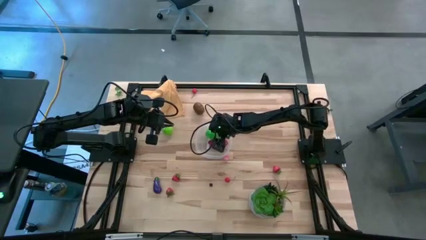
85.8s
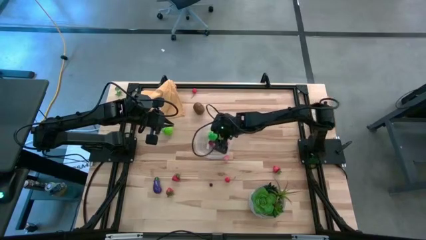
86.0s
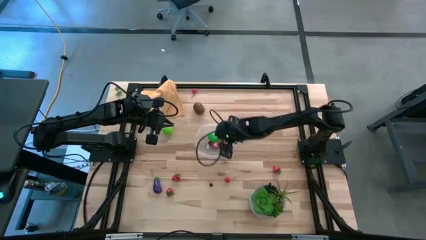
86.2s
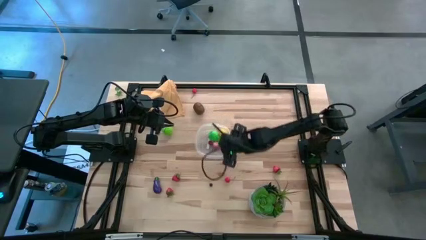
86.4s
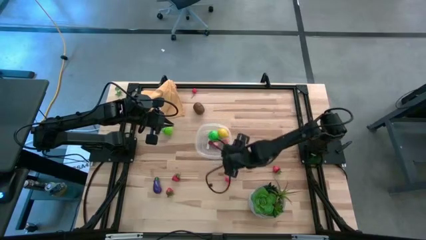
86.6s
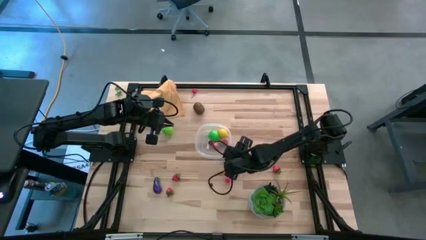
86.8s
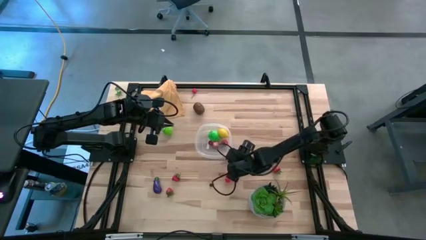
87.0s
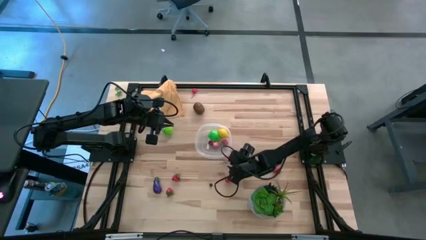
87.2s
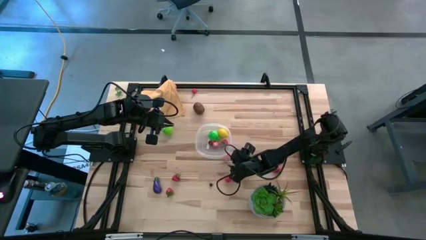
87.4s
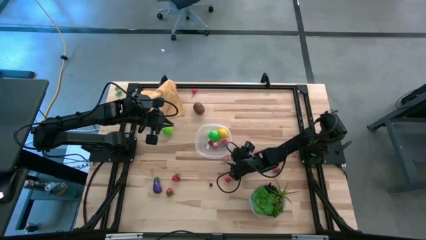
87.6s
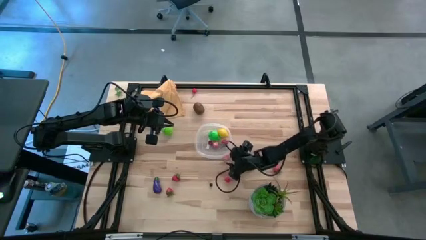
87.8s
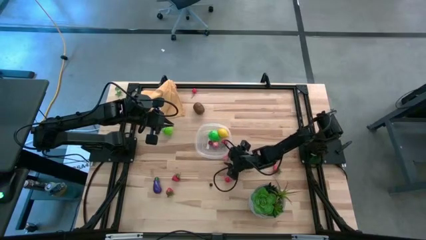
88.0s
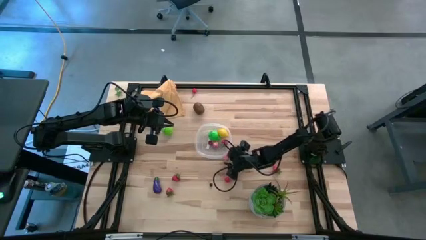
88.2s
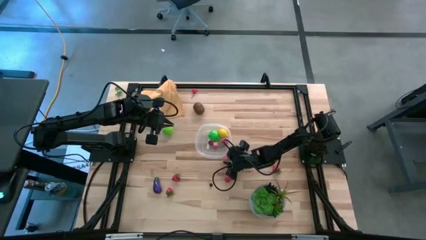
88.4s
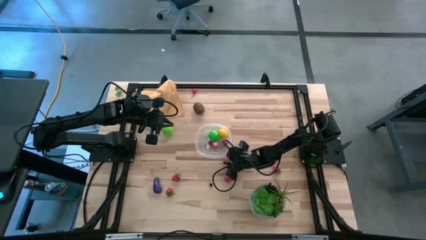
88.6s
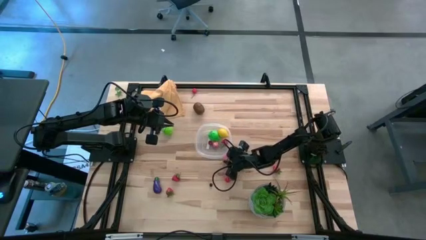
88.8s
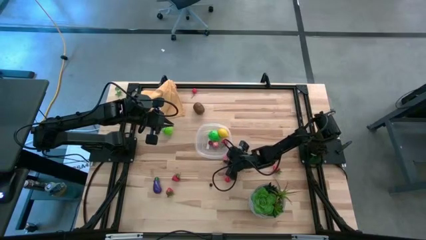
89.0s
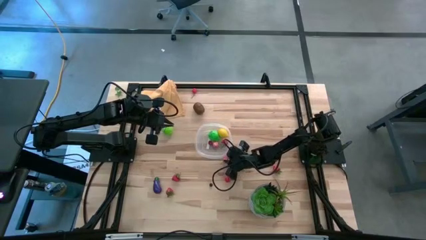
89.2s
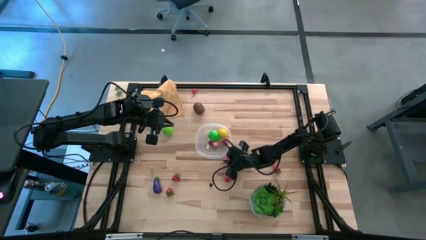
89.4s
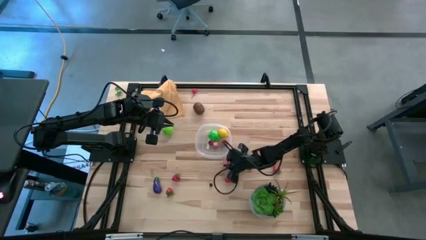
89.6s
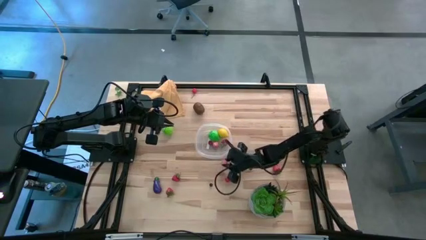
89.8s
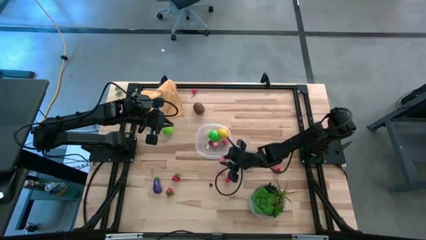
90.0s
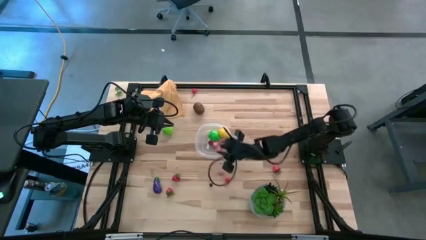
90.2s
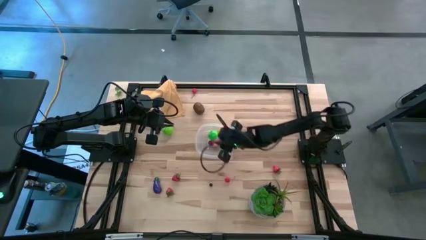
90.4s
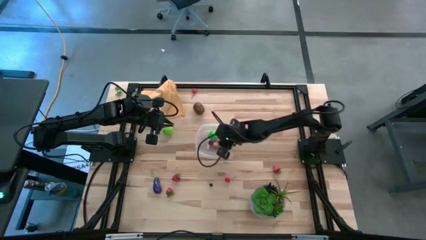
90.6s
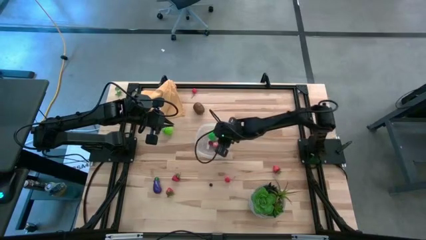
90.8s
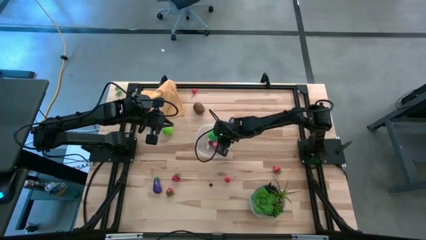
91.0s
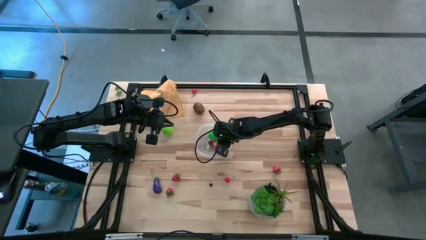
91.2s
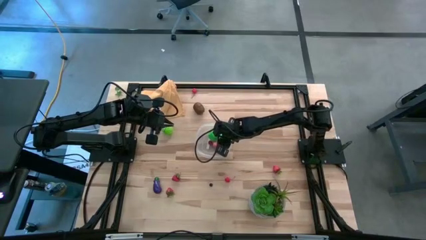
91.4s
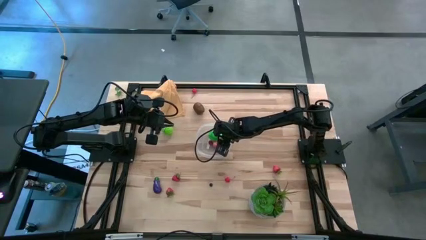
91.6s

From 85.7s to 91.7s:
Task: Pick and placing Produce into tupperware
Put the apricot into the transparent bin

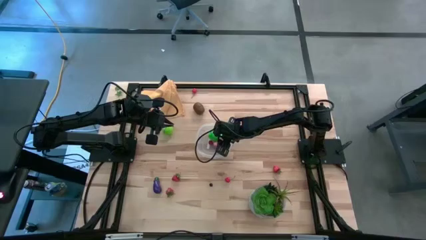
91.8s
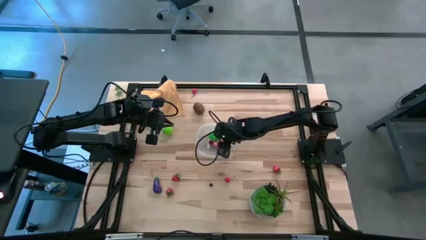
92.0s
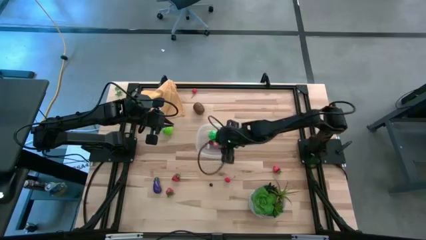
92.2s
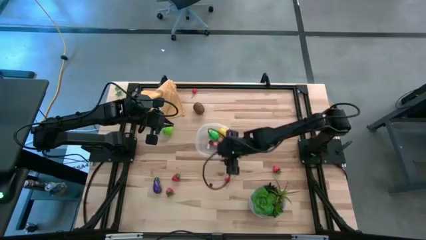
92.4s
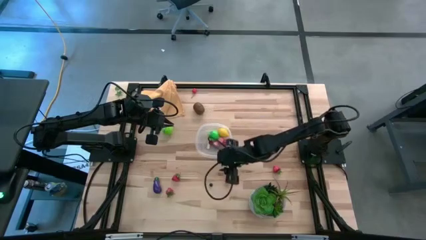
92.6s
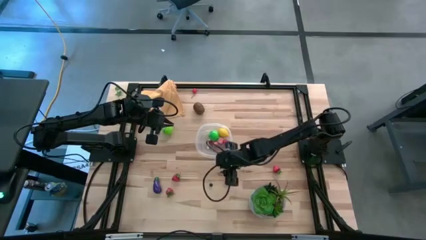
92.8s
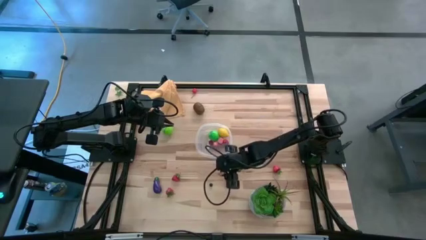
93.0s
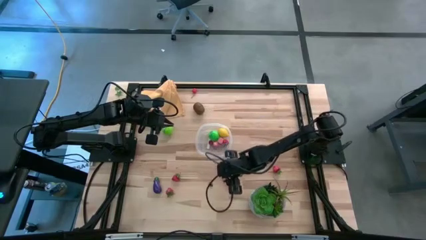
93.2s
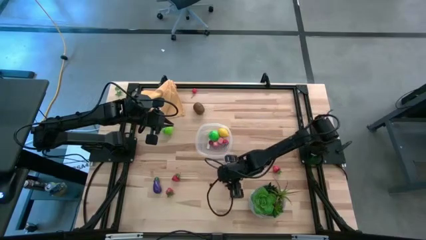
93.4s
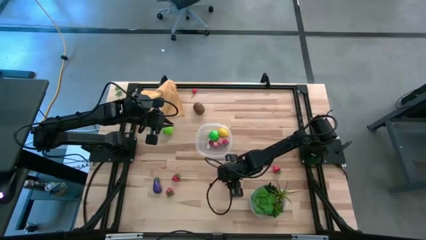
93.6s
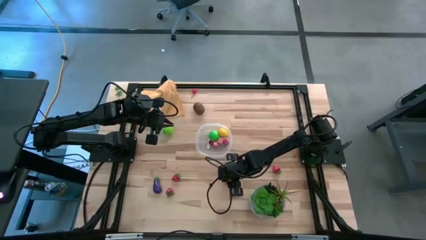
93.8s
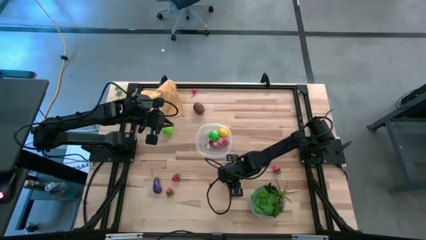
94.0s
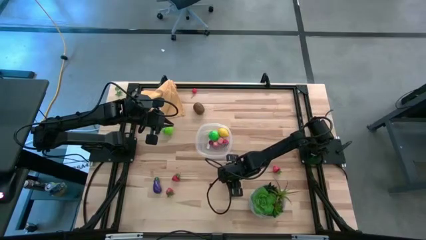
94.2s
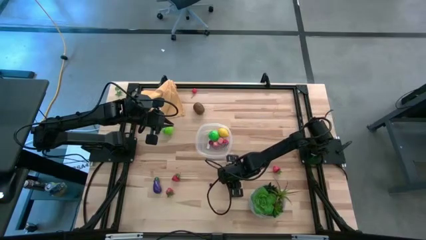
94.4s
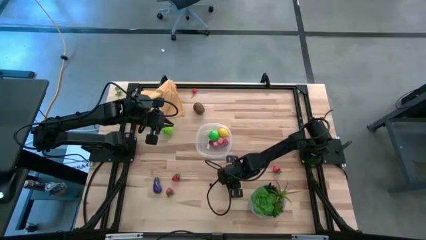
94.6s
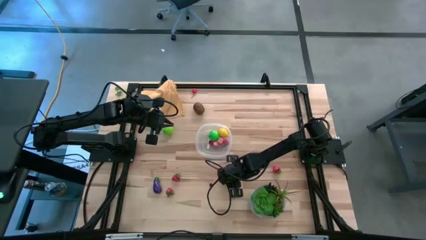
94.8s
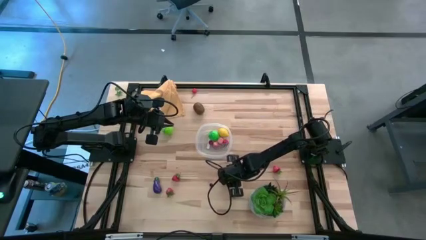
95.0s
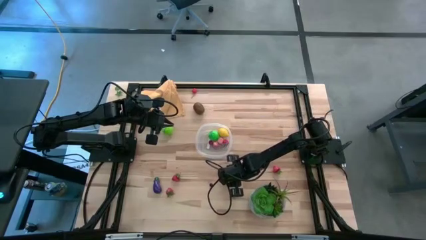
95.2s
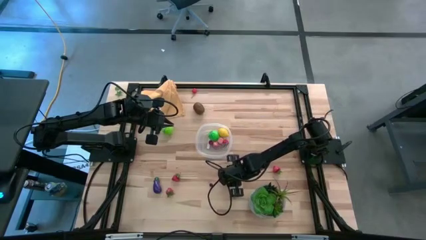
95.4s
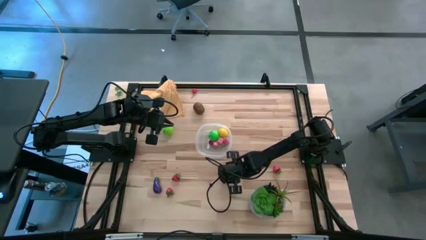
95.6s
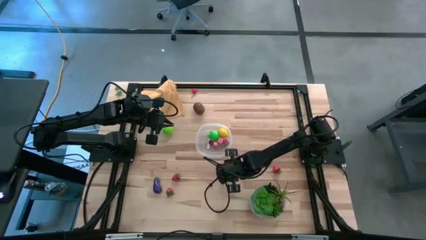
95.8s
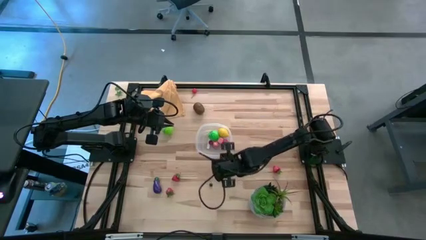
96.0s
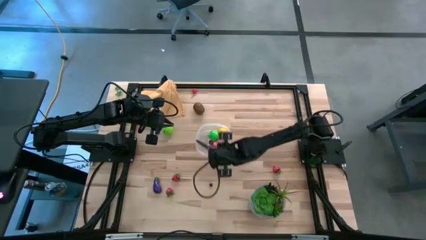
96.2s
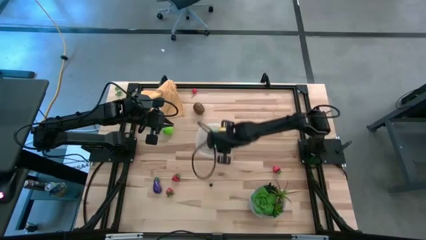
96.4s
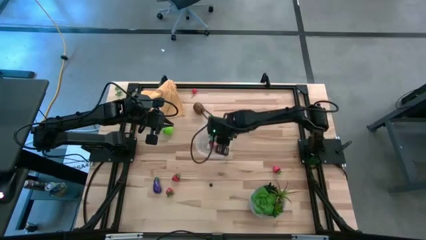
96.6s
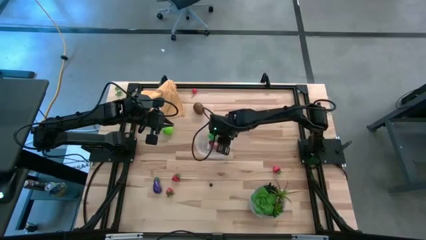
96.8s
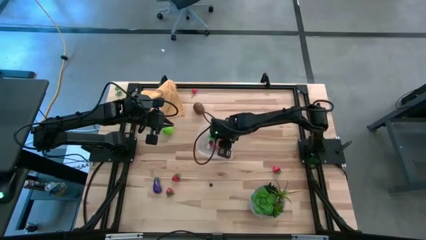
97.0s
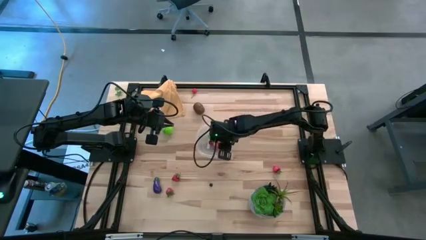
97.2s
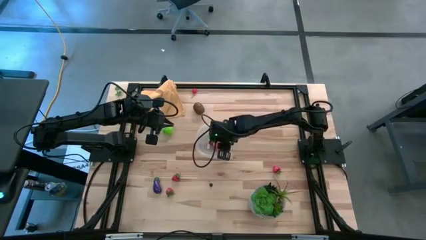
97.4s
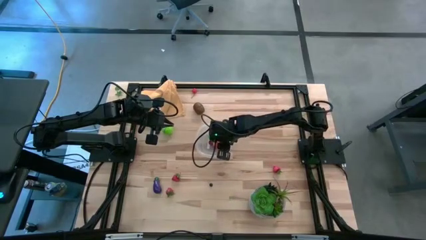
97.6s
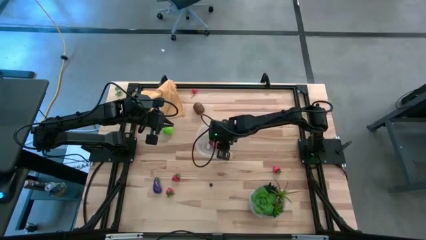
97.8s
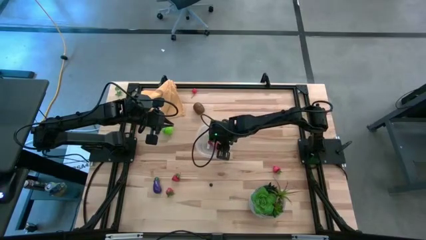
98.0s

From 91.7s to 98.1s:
Put the bottom red cherry into the transparent bin

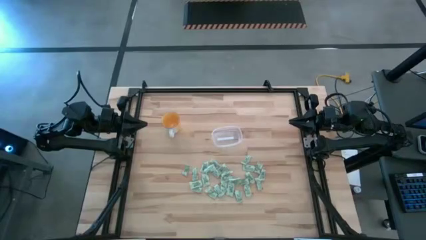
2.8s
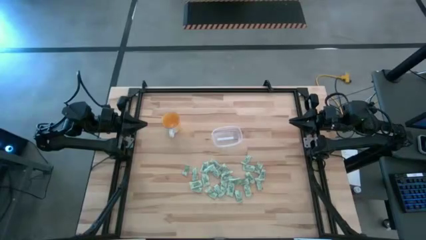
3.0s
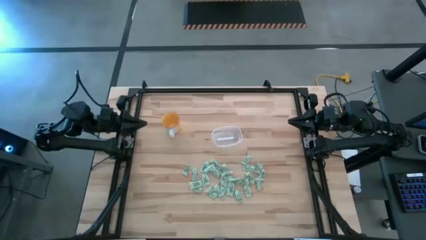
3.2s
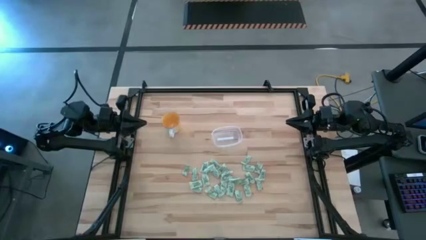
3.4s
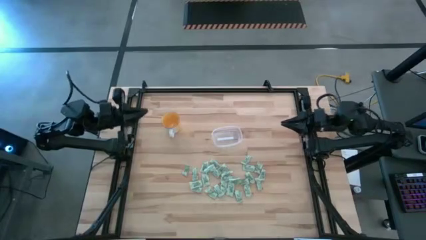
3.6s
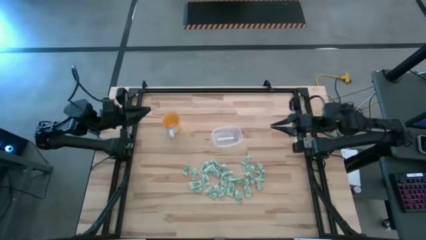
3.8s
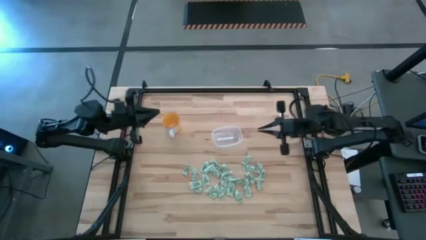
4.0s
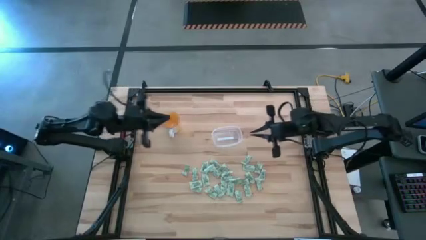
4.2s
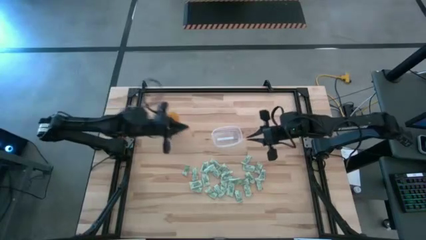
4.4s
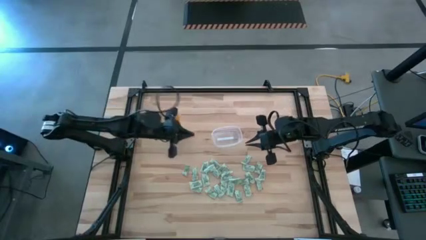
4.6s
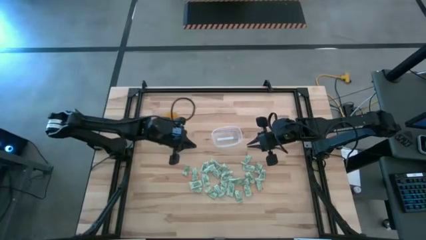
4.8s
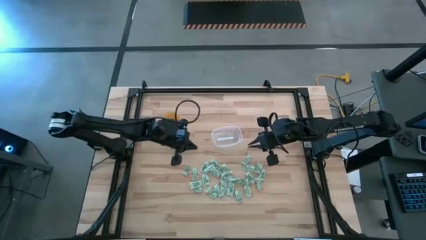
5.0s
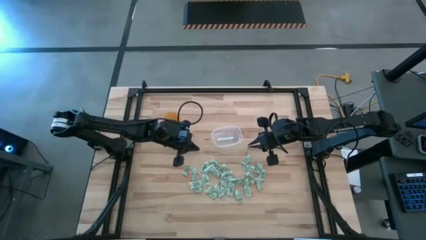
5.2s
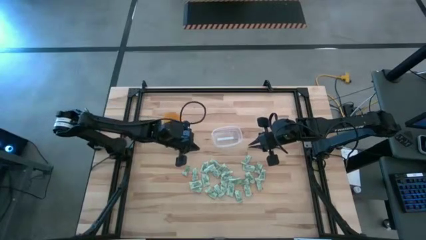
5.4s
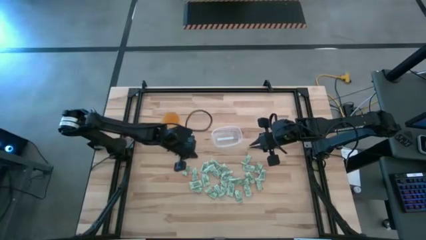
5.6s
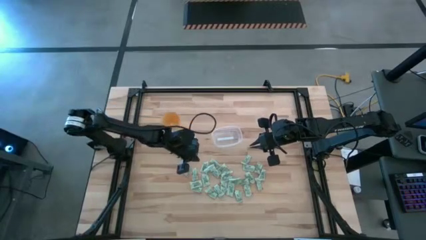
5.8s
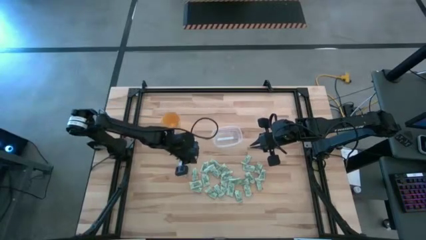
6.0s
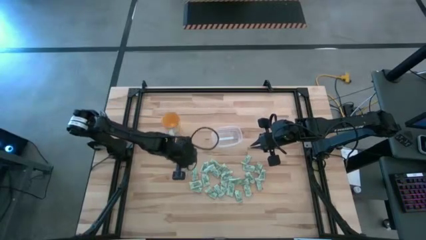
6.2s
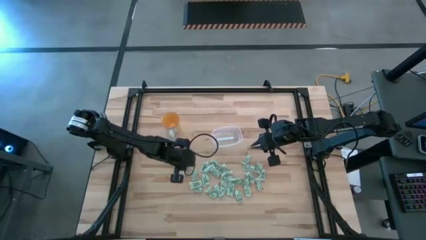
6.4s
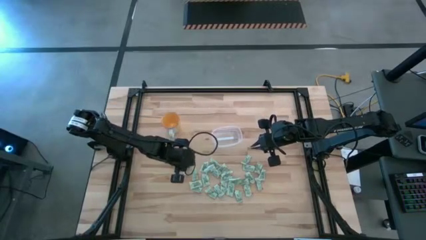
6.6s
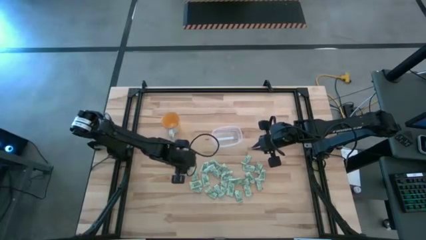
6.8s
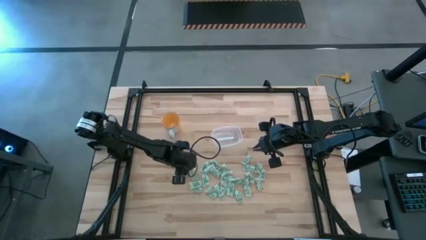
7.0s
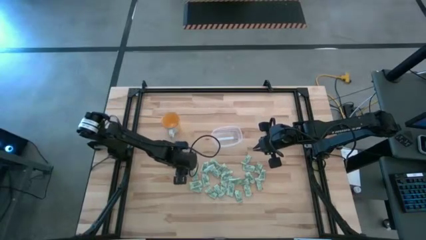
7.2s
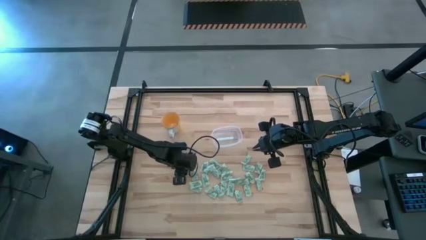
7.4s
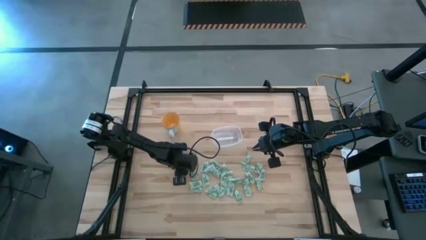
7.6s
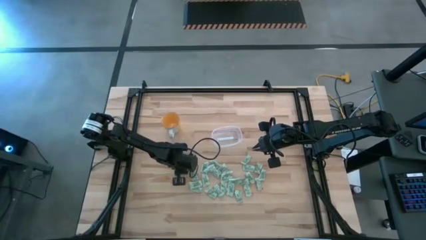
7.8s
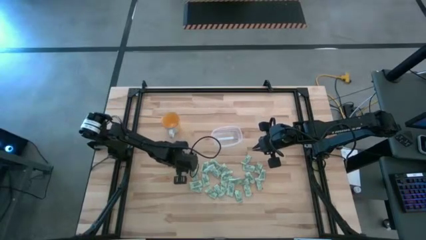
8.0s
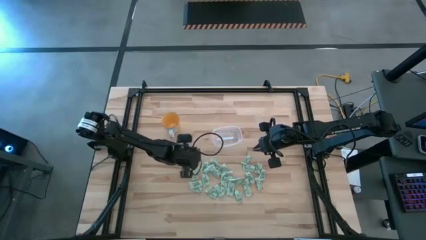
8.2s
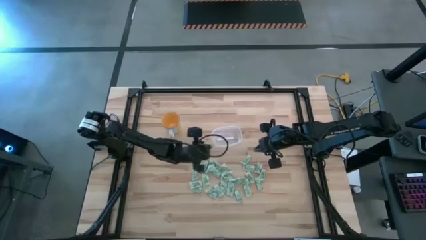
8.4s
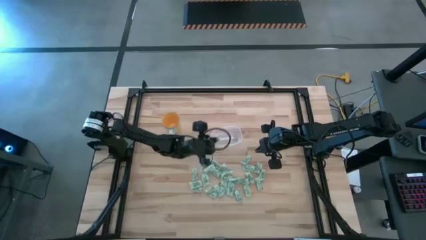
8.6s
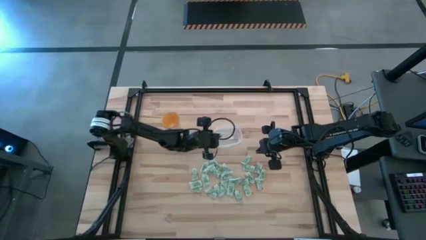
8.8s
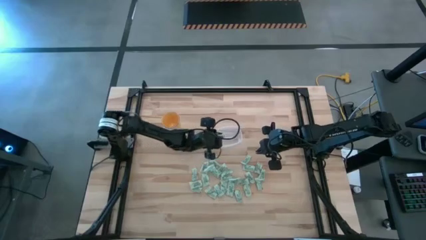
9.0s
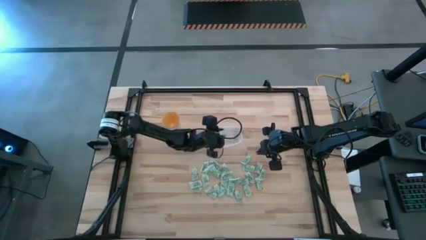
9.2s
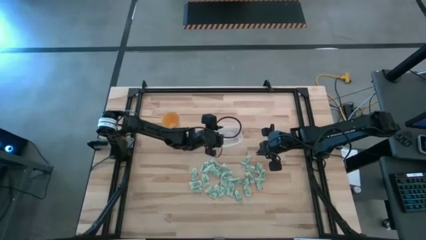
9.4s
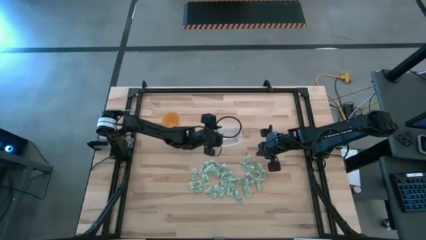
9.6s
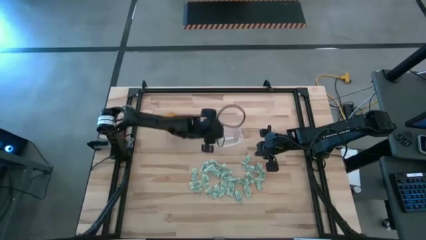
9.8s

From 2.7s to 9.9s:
Task: Pick and place Stevia / Truvia into bins
Put the stevia packet into the transparent bin
